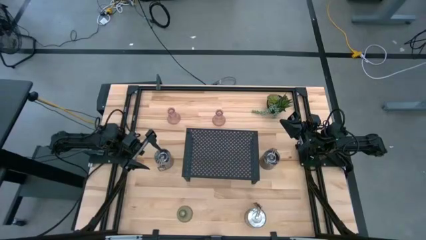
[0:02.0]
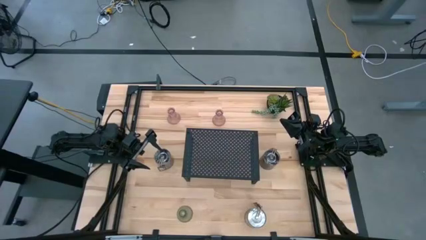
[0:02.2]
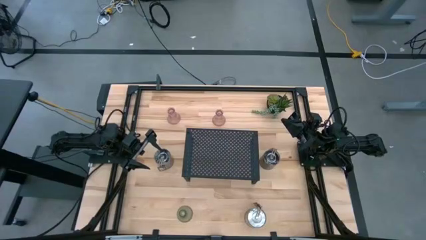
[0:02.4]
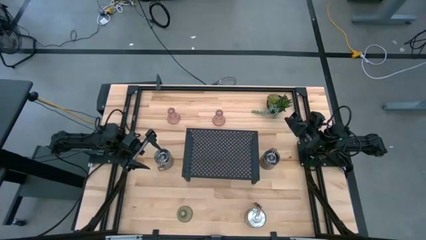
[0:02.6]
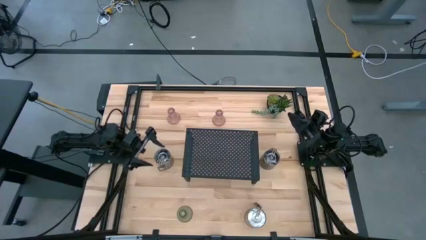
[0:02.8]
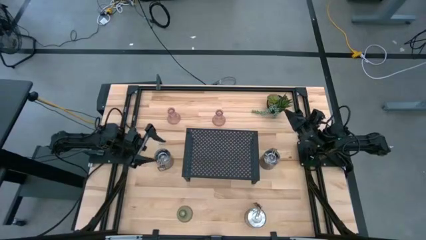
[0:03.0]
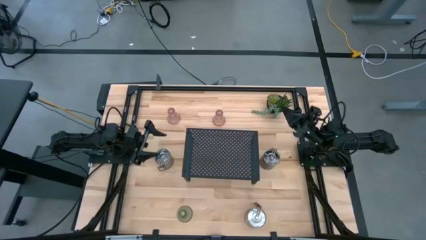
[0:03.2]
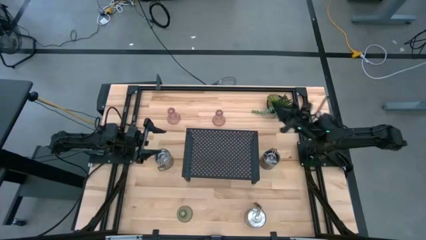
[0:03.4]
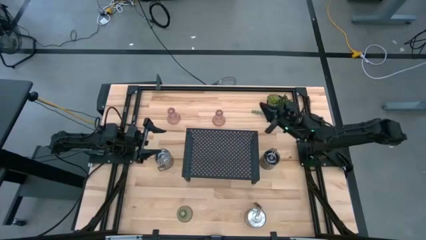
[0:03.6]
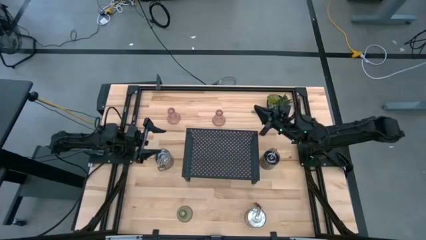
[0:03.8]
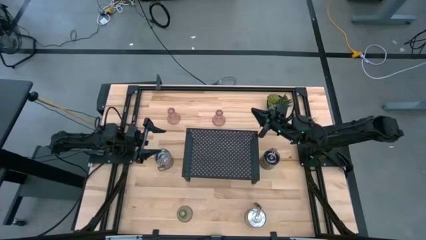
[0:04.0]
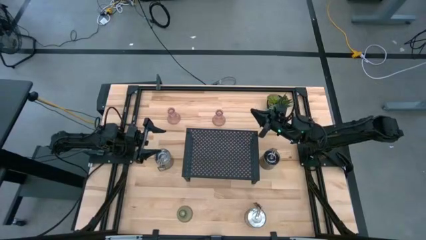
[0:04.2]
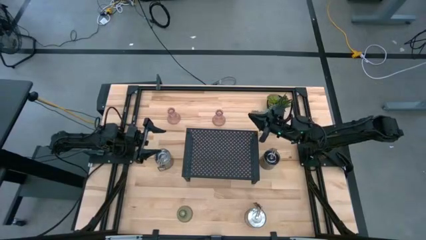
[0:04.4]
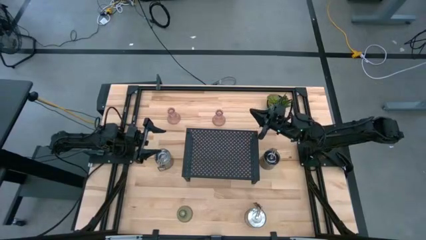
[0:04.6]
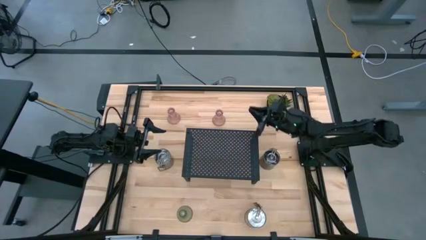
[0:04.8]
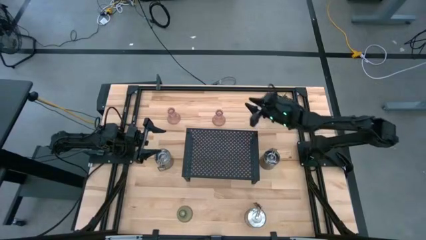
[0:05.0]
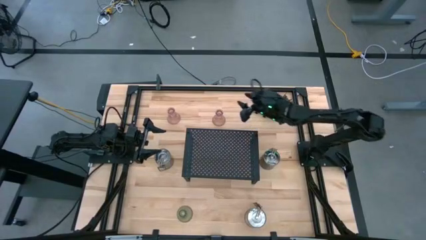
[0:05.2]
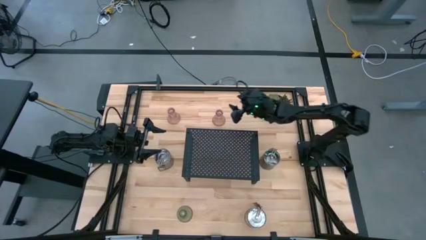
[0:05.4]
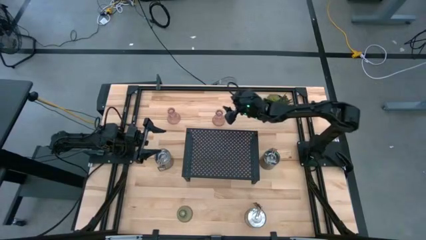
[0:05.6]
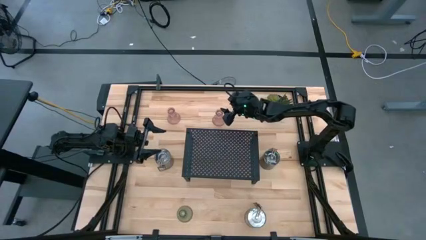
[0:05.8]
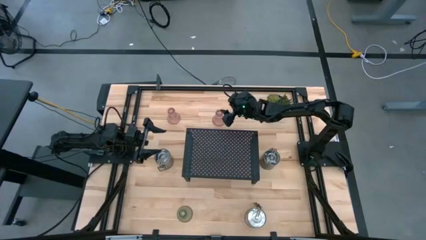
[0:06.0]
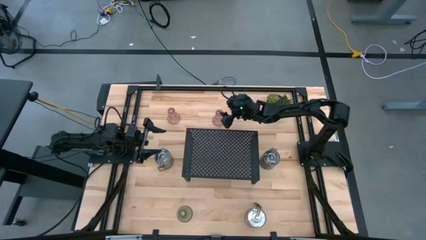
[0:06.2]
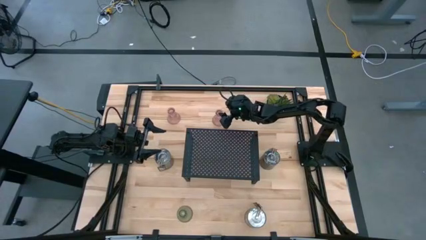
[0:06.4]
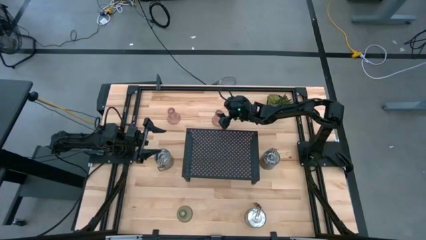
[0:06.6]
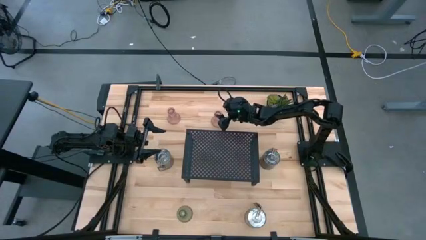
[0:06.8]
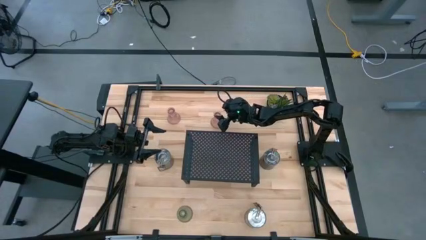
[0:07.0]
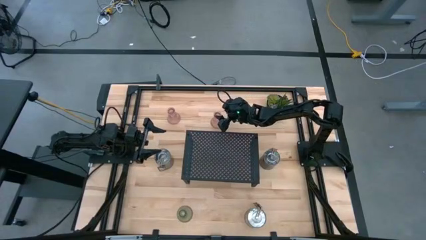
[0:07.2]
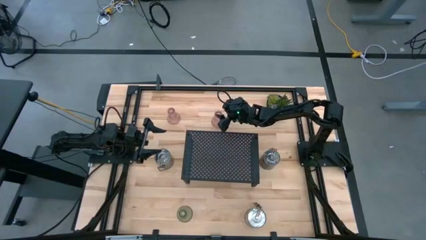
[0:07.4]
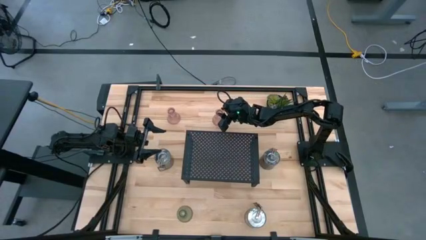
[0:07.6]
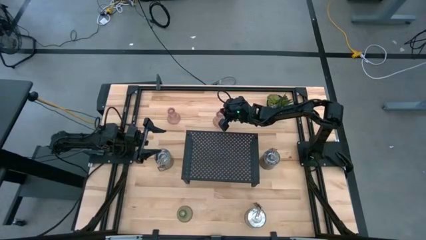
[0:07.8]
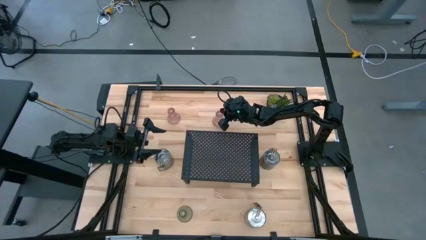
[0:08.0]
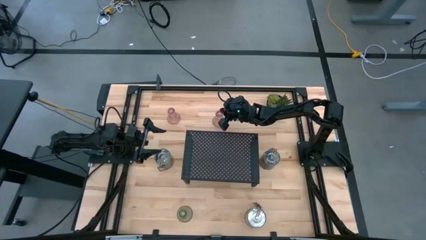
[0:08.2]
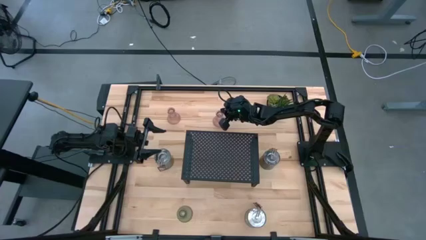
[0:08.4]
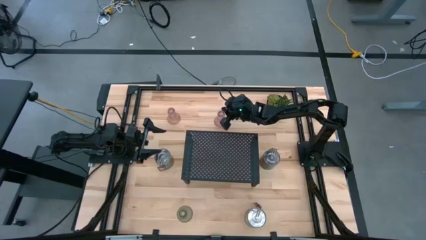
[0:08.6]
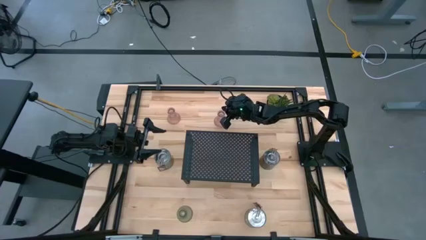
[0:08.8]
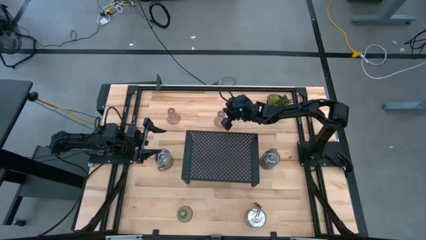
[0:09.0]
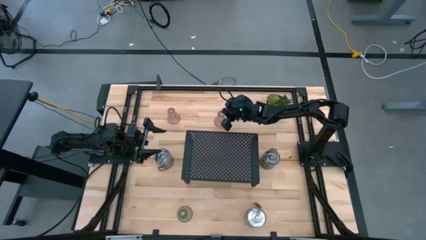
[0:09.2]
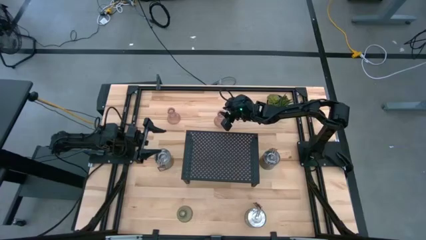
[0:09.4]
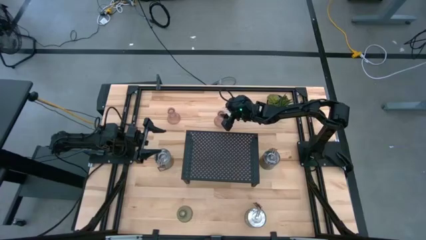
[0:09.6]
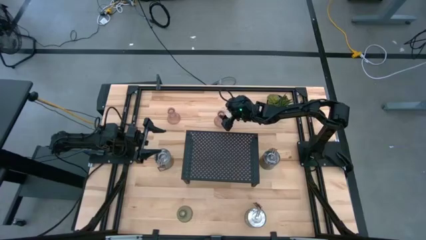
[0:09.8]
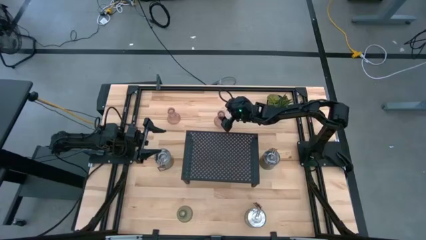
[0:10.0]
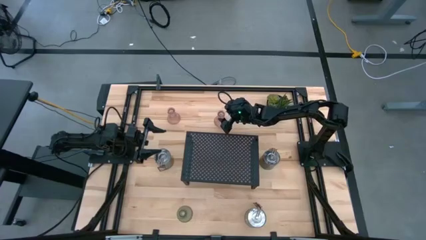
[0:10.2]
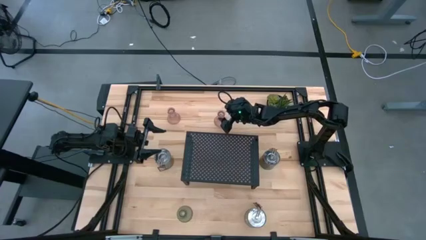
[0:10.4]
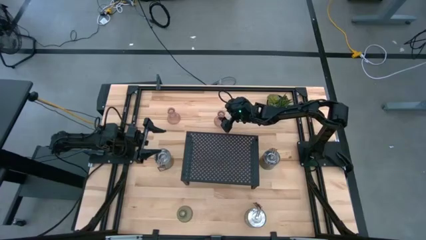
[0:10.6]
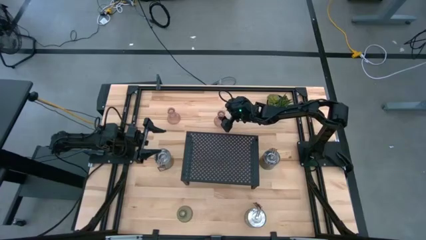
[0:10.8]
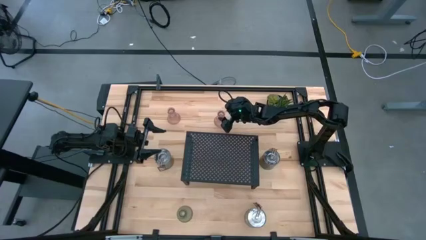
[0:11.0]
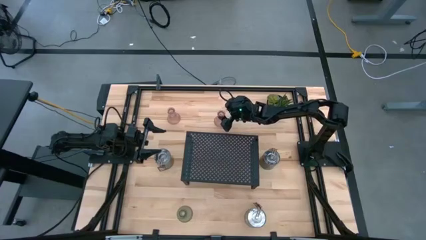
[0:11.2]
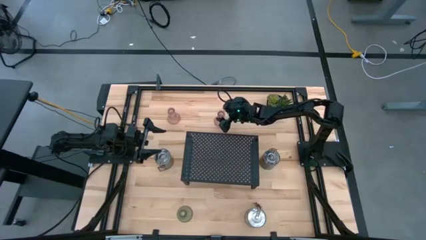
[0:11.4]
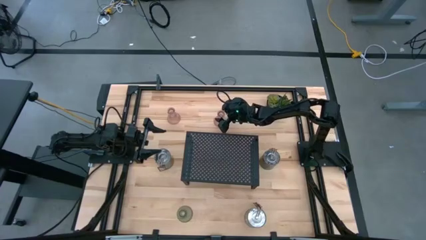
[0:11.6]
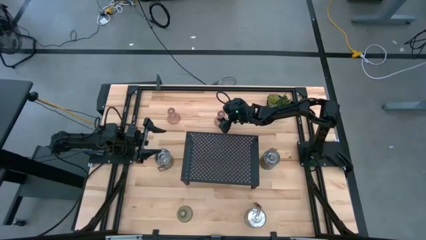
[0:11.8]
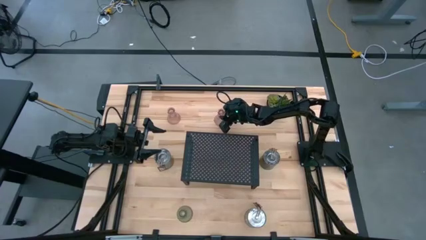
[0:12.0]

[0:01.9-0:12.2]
Task: Pick & Place candle stick holders
Put the right pink candle holder on the shelf

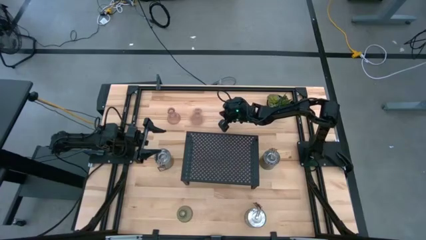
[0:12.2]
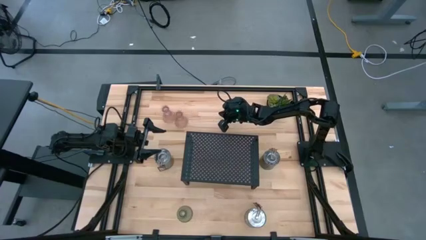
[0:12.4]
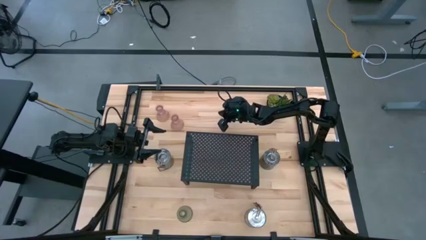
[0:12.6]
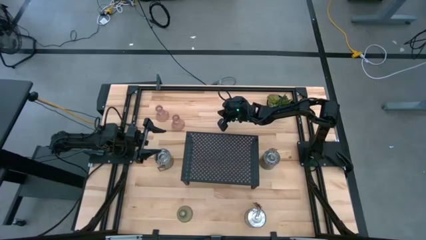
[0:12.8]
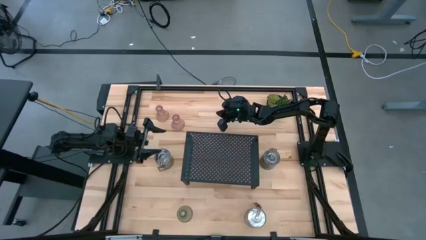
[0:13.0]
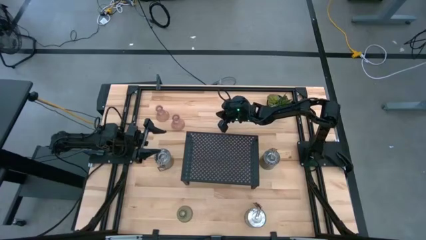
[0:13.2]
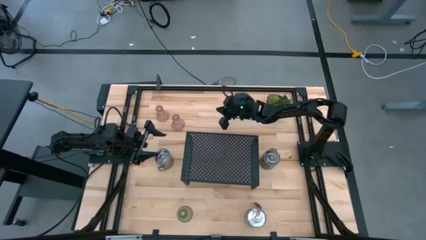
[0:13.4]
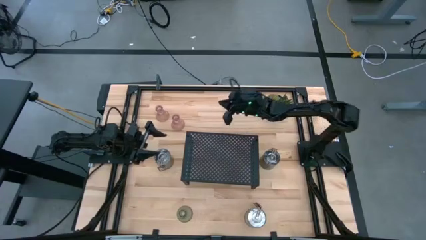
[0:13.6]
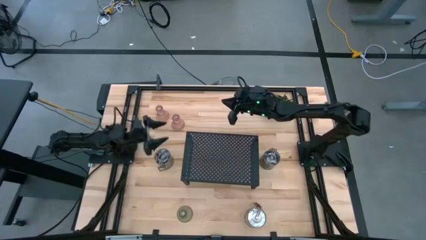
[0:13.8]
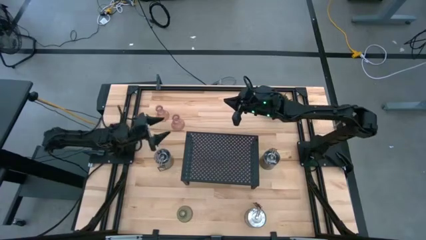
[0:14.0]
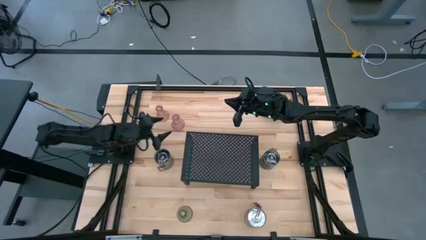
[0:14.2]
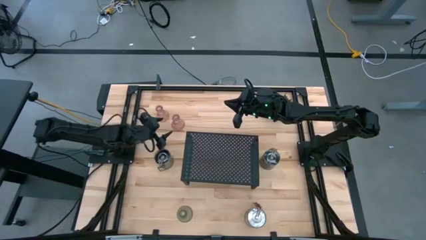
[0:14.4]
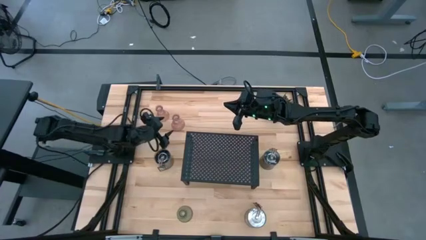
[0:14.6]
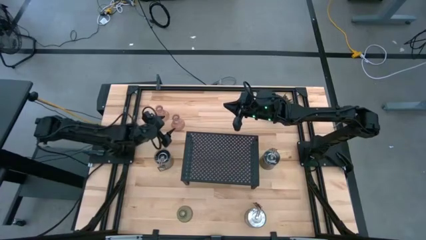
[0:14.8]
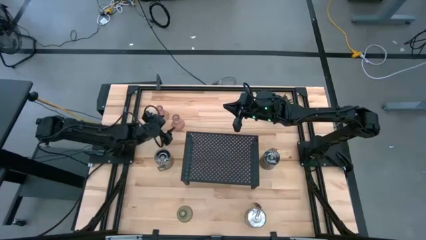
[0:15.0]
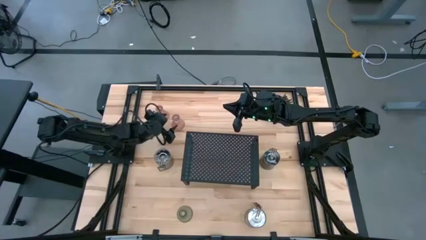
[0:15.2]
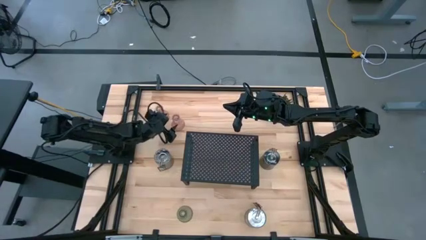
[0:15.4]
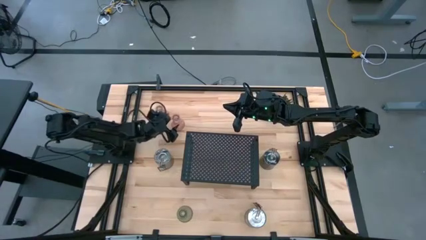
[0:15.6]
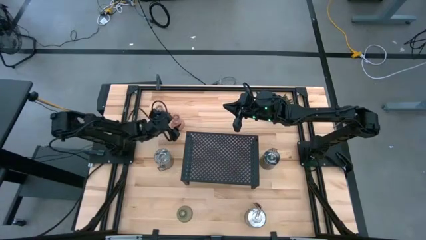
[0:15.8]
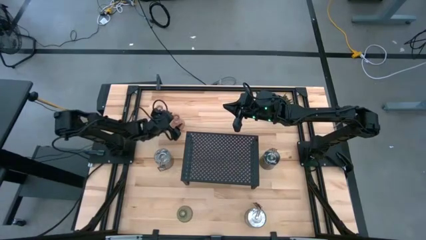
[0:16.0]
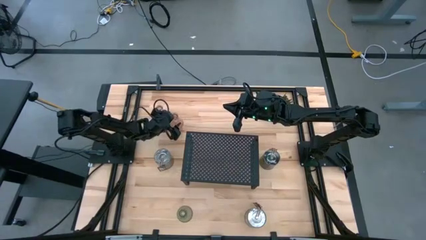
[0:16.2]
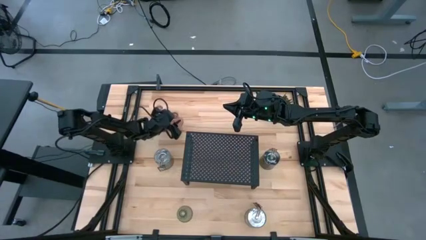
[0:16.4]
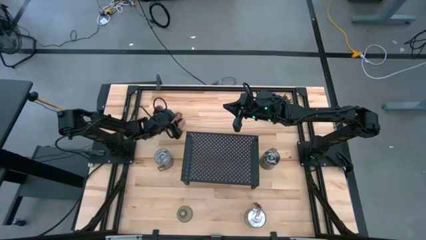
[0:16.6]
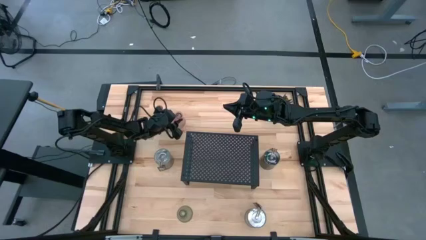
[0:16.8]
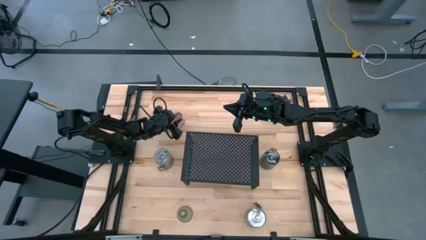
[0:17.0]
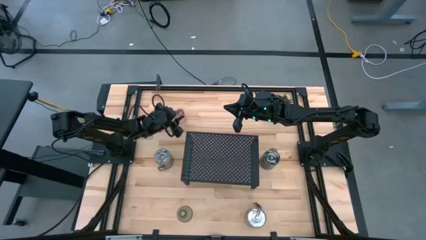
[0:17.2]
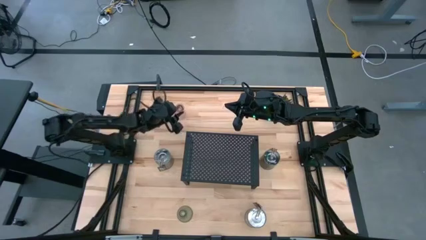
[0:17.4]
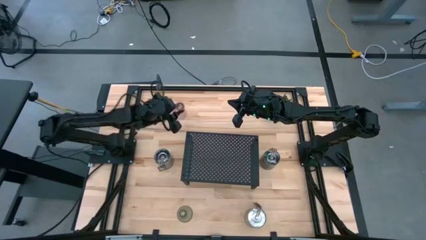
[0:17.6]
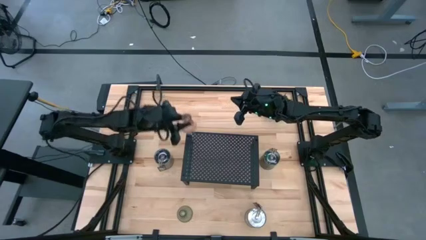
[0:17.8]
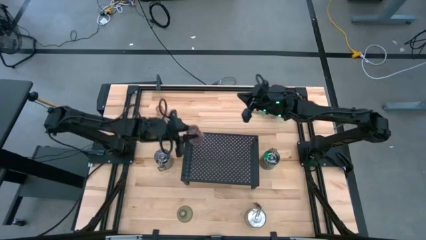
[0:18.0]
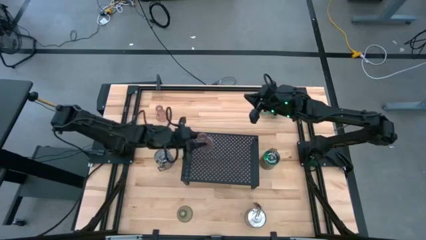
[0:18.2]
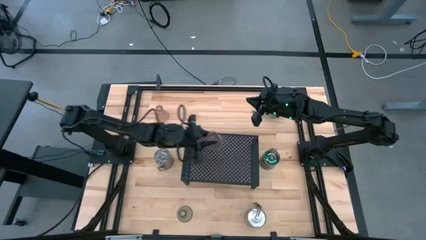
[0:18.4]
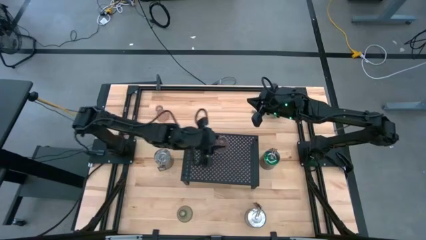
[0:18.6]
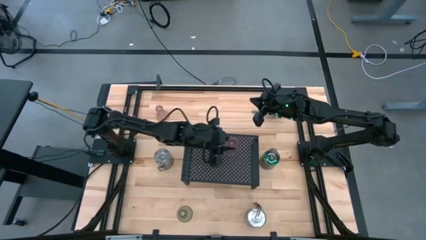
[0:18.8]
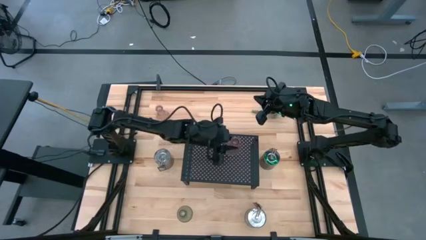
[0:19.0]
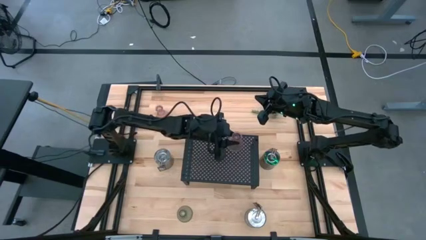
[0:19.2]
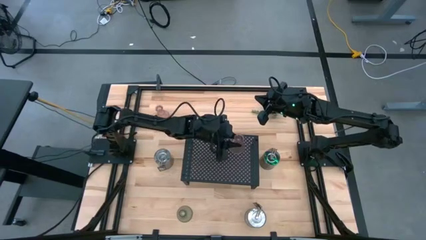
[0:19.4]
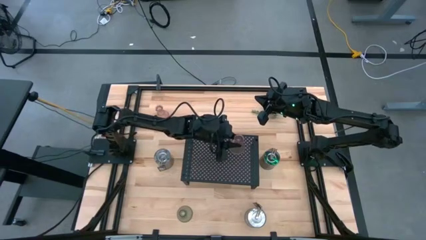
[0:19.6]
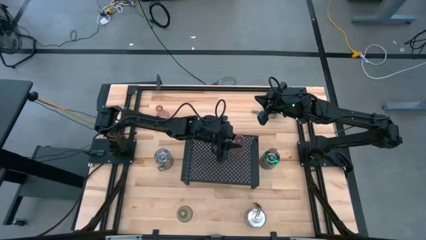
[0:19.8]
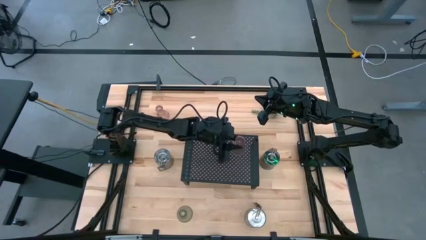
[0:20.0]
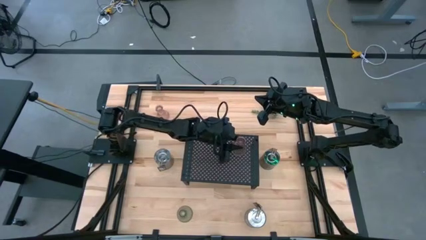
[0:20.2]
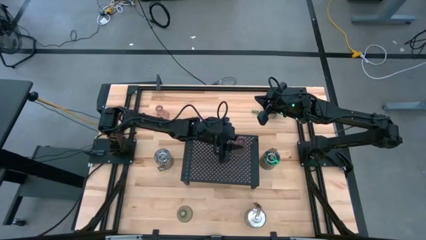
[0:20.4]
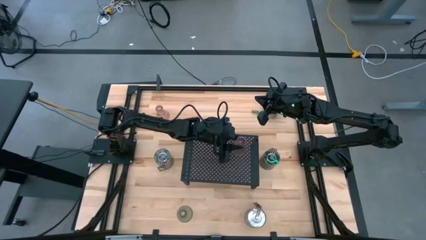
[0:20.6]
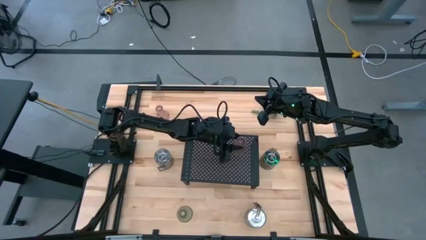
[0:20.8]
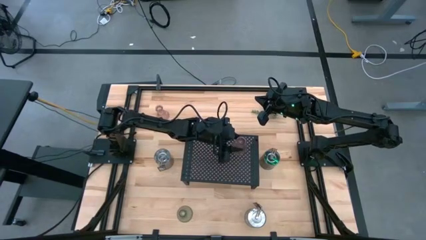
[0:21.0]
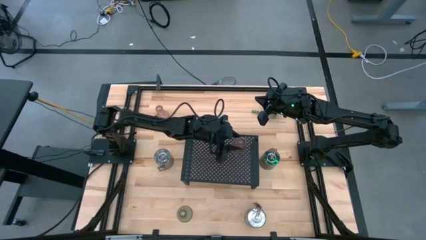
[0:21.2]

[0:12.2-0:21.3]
Put the right pink candle holder on the shelf
